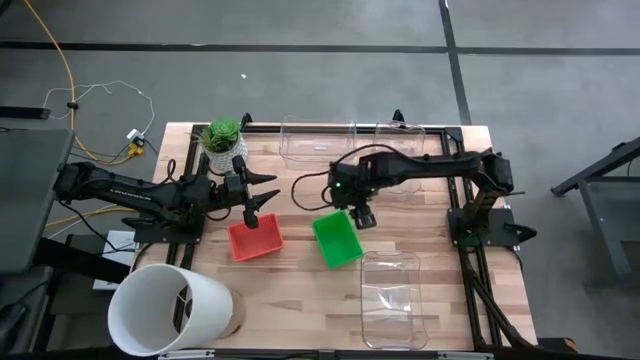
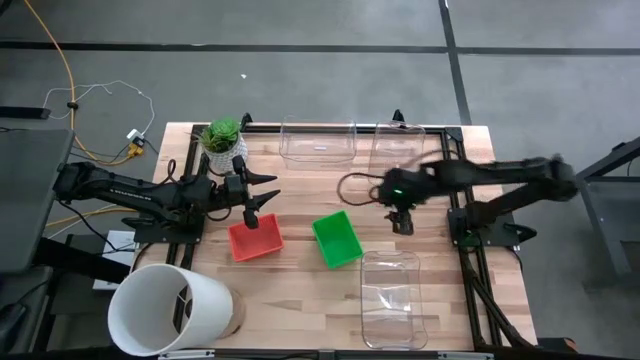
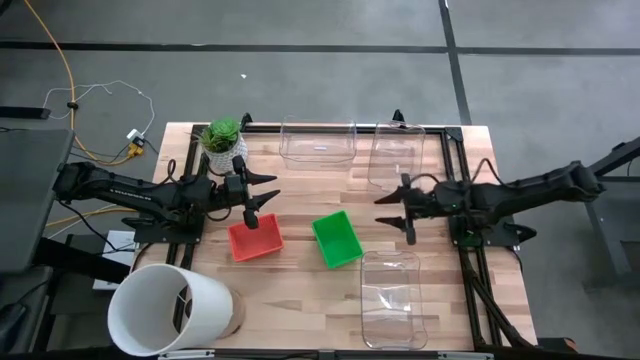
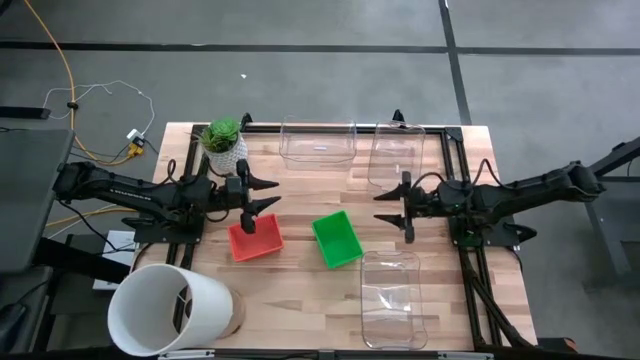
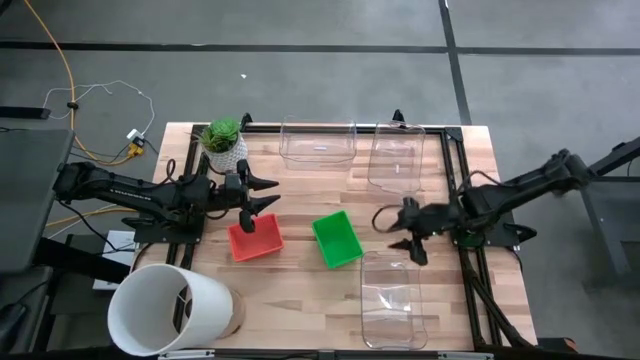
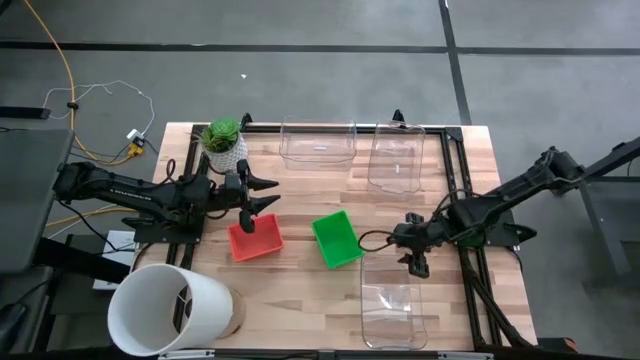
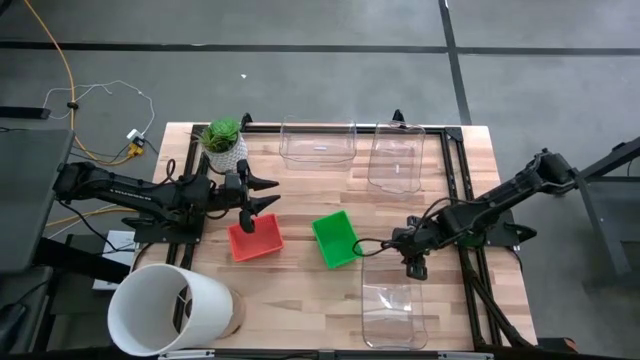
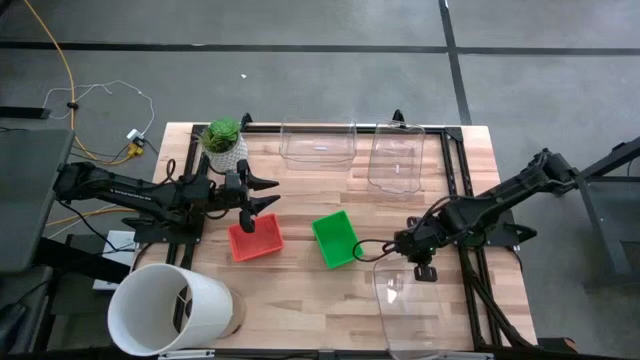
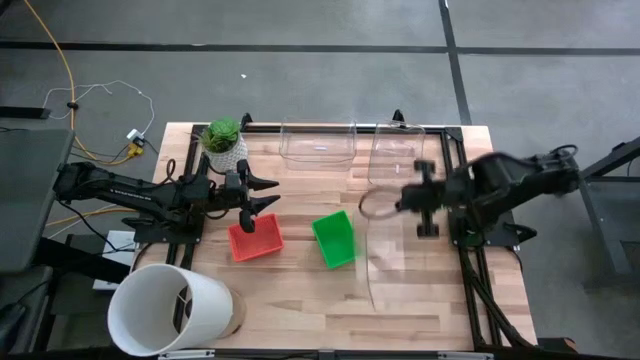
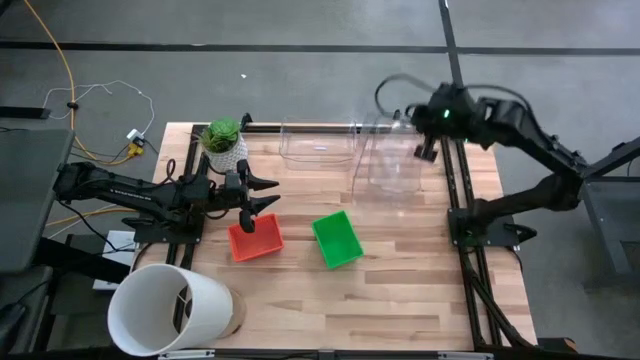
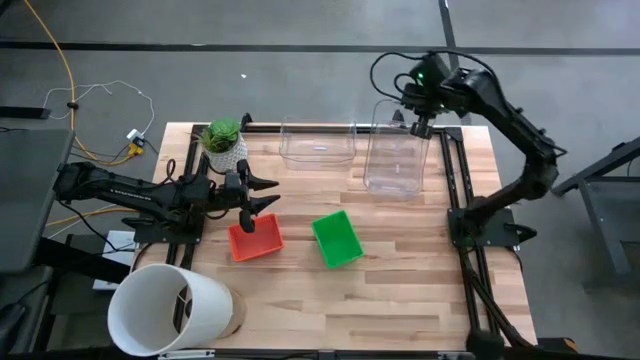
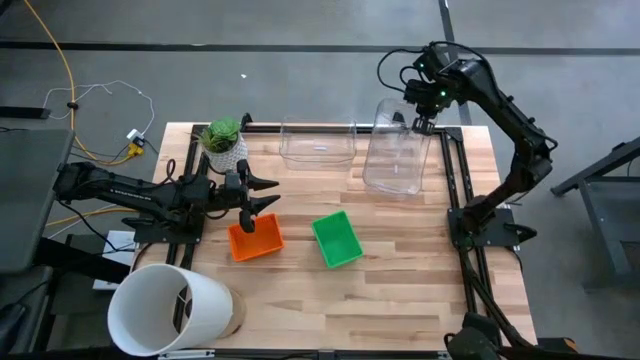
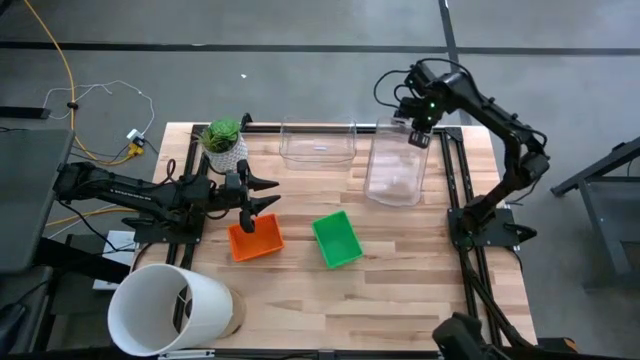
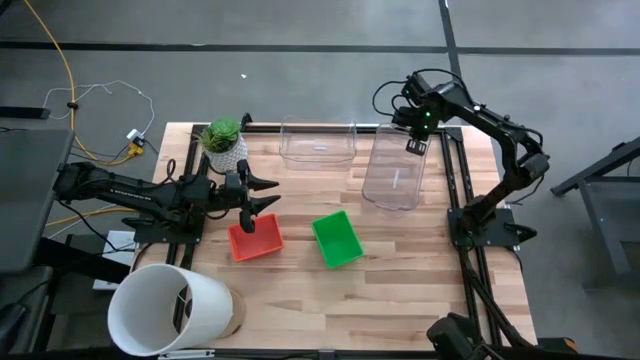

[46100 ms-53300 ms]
Stack the bottom transparent bin on top of the top right transparent bin

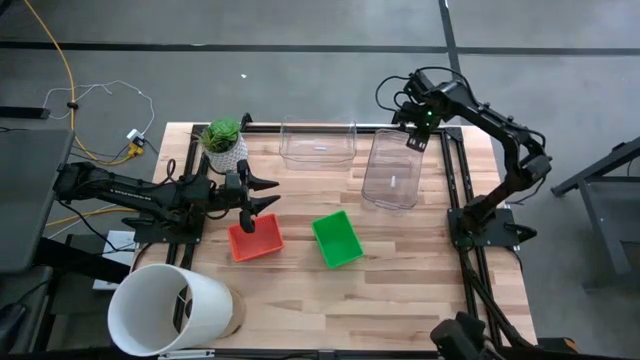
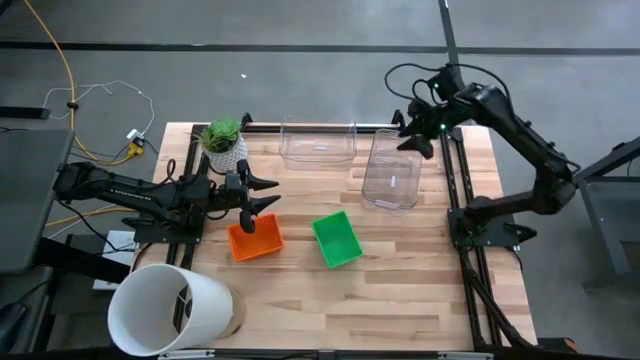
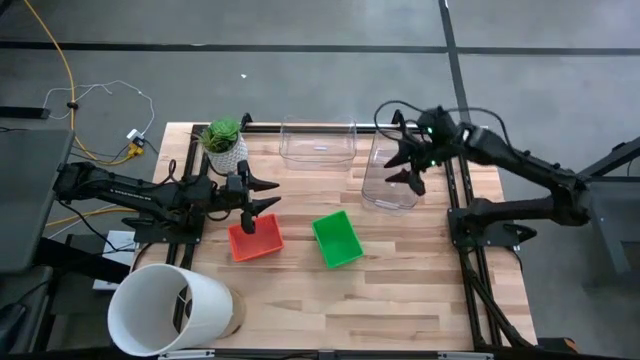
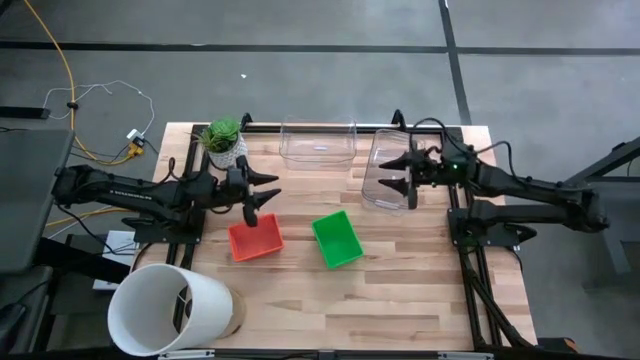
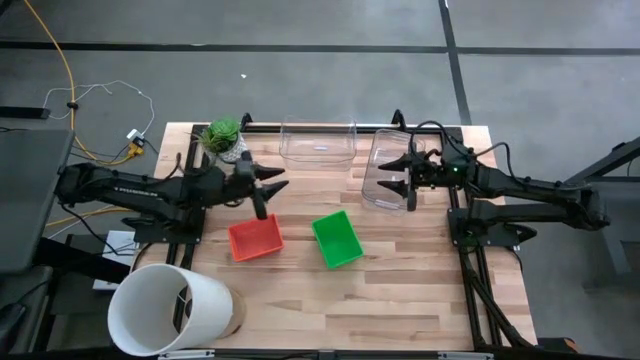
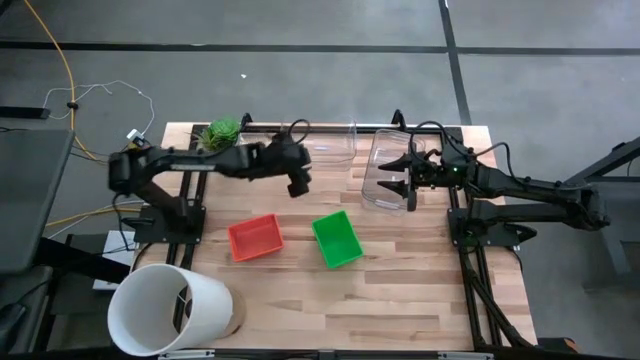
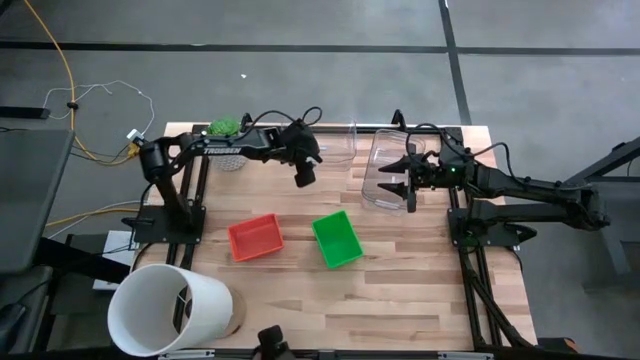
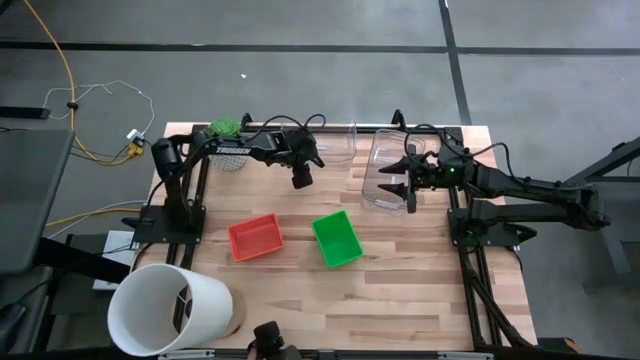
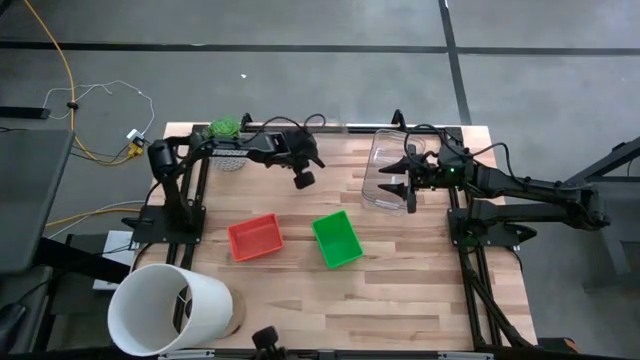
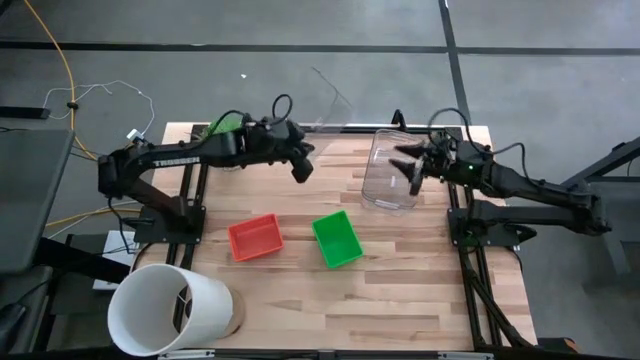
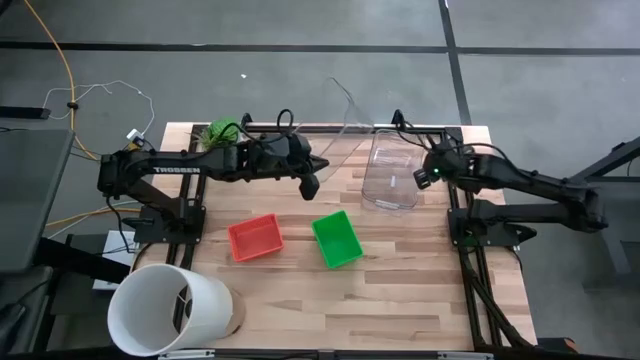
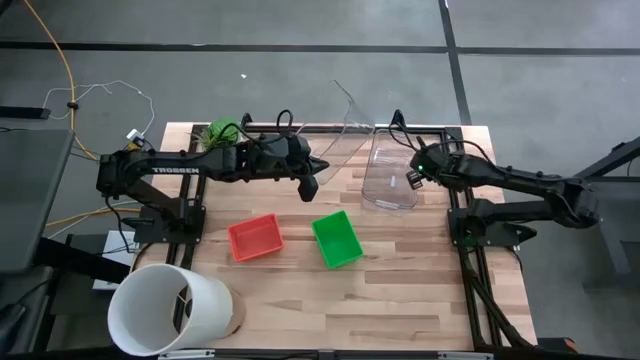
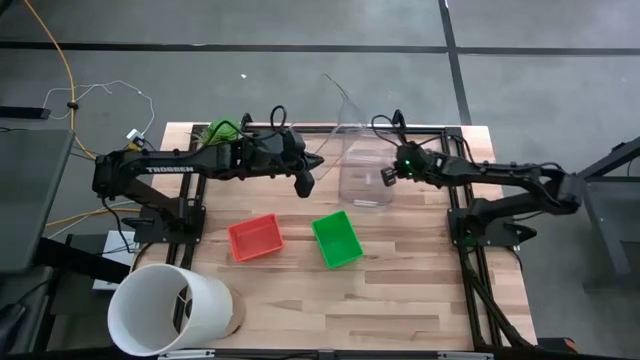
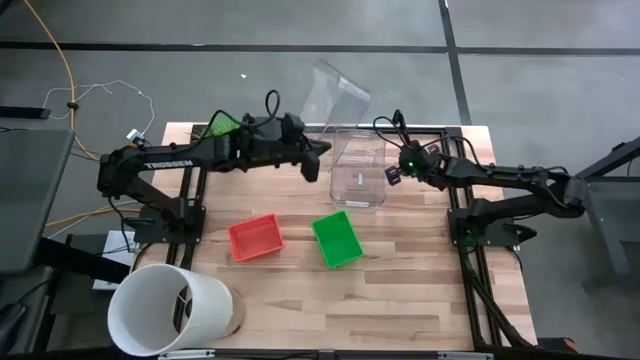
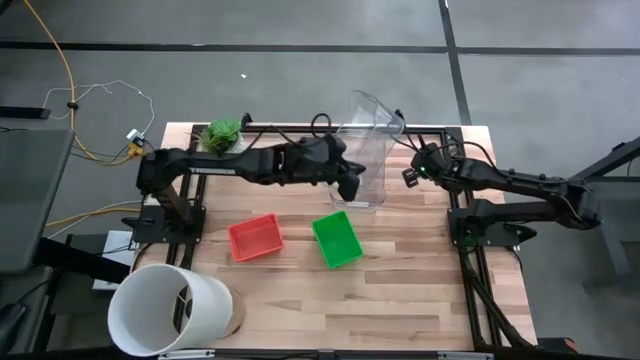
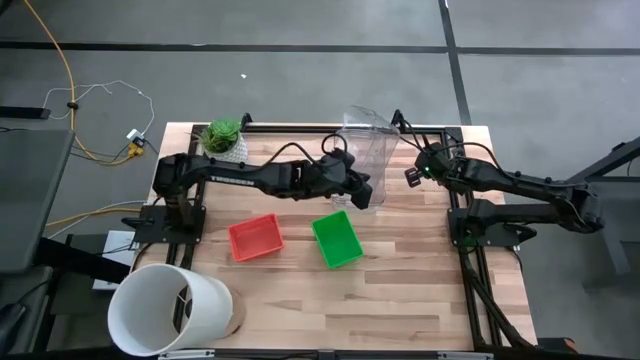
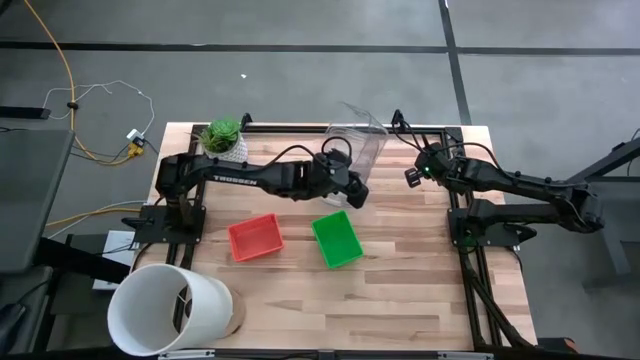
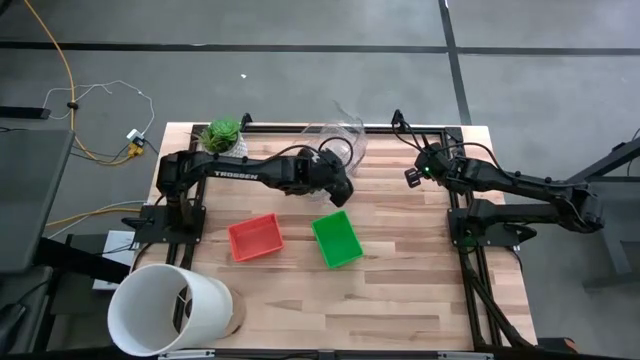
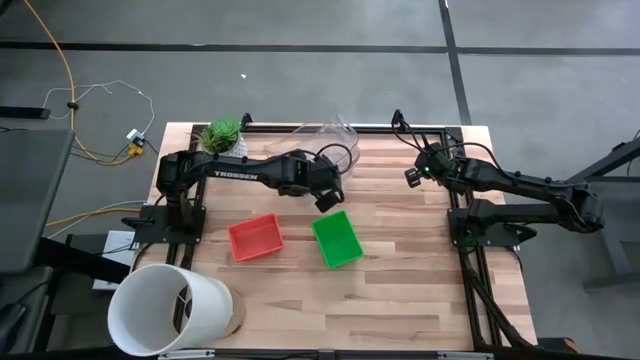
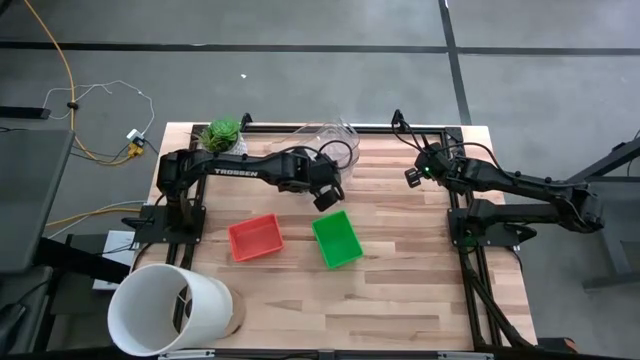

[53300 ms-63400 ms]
Stack the left transparent bin on top of the right transparent bin

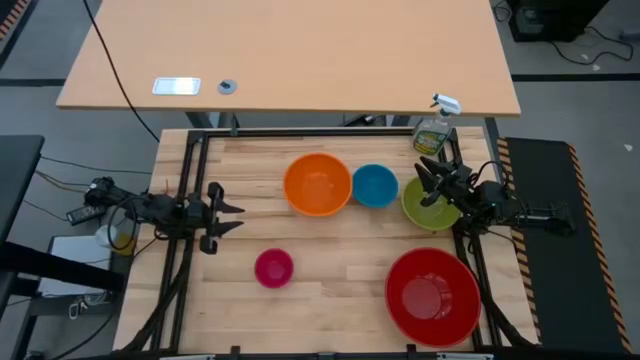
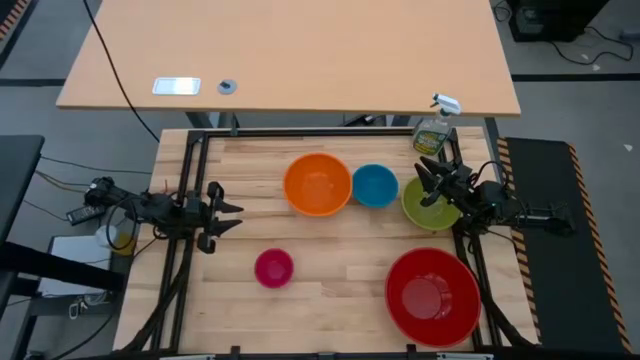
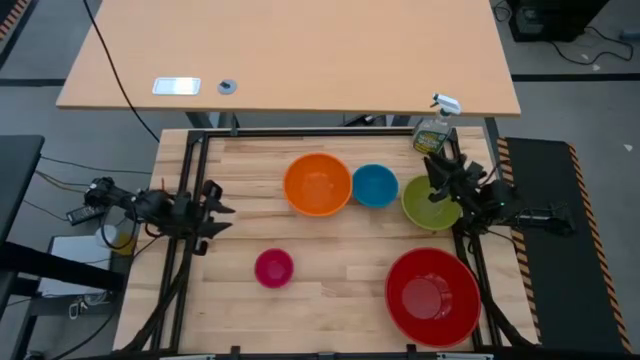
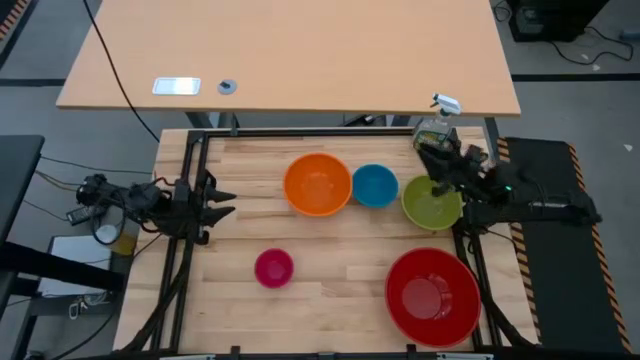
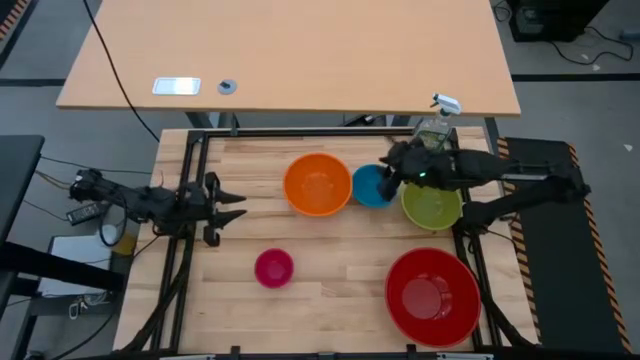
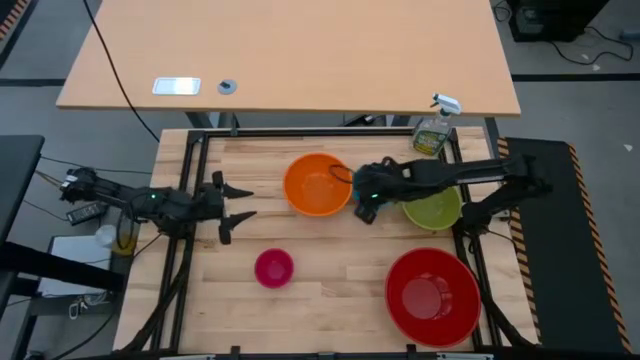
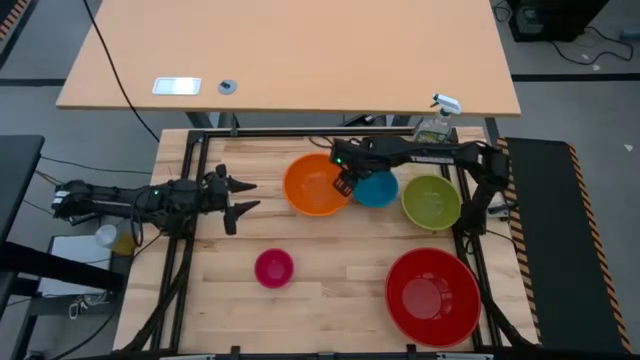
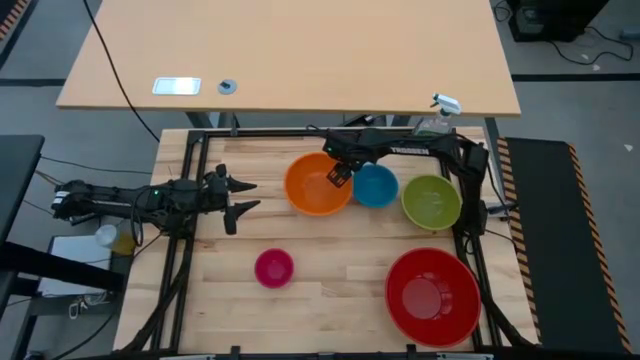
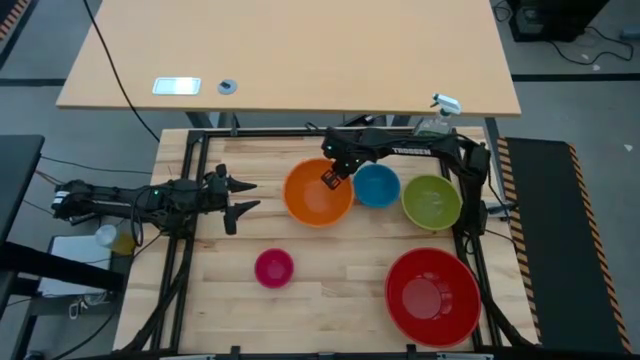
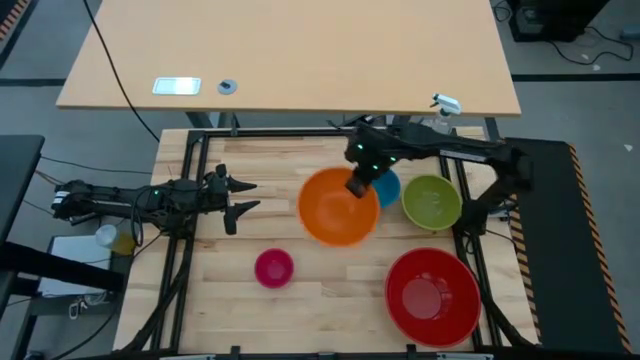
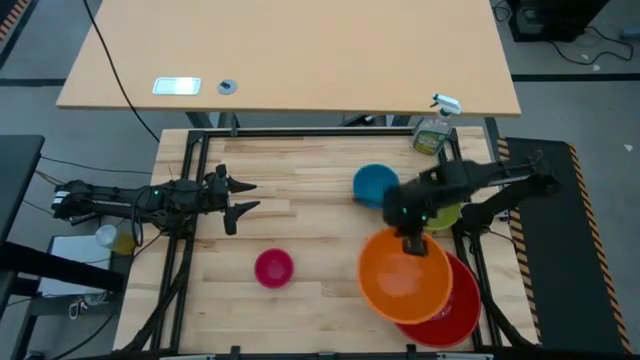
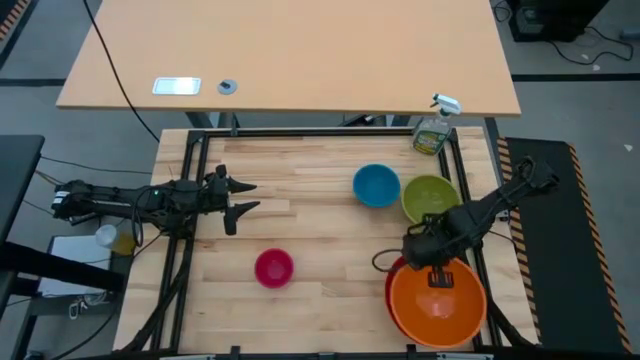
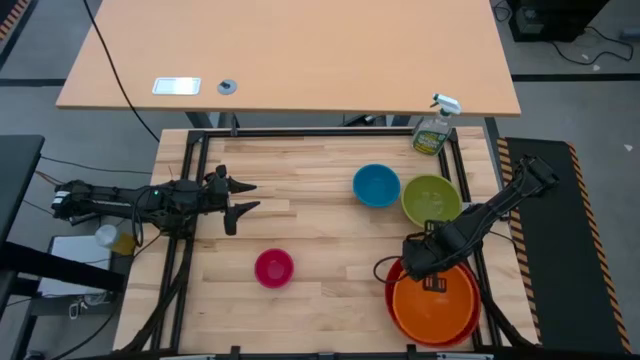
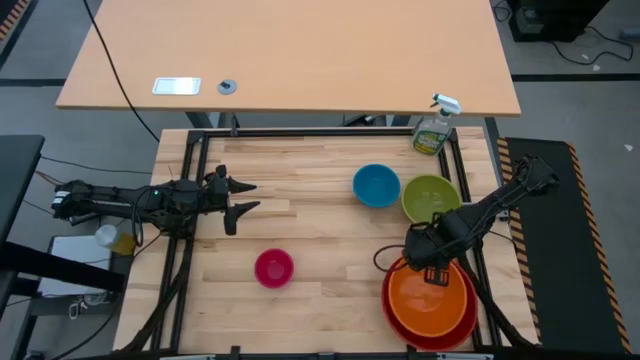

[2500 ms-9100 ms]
Stack the orange bowl on top of the red bowl
